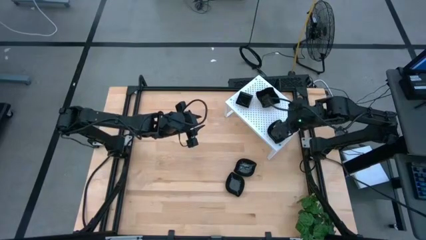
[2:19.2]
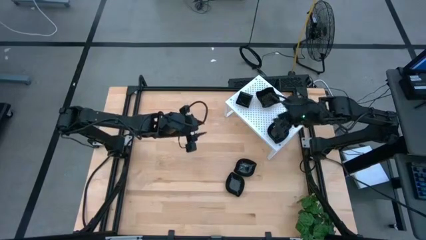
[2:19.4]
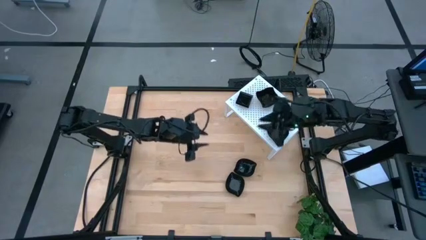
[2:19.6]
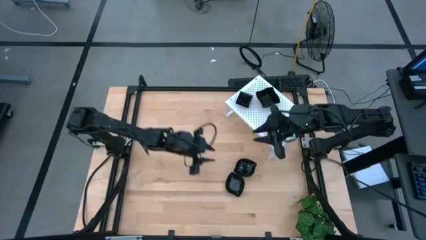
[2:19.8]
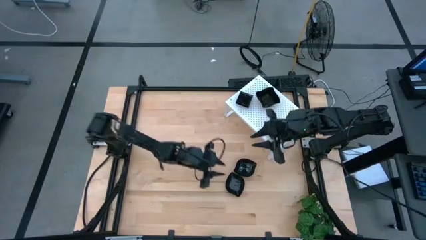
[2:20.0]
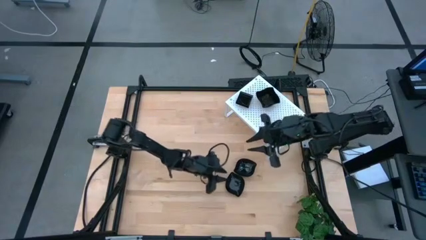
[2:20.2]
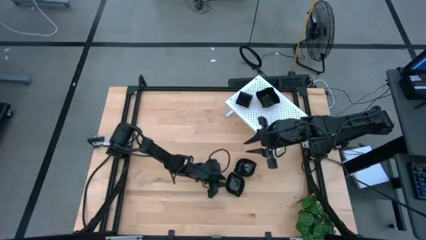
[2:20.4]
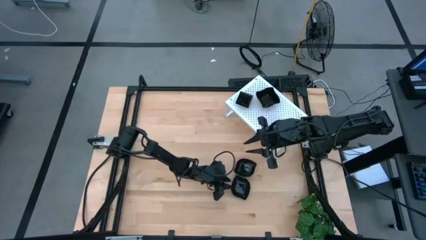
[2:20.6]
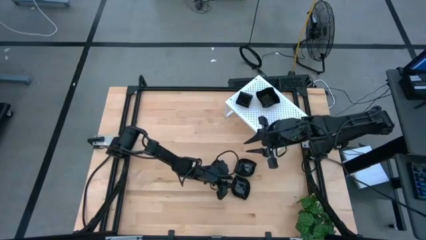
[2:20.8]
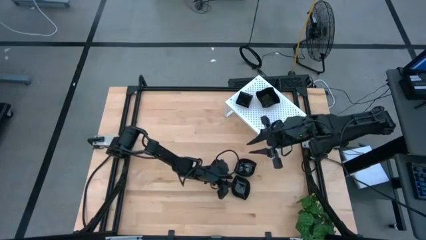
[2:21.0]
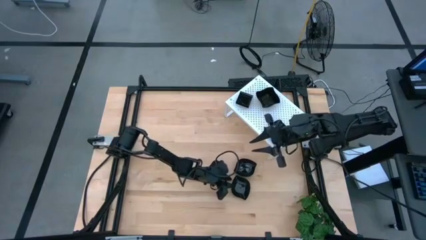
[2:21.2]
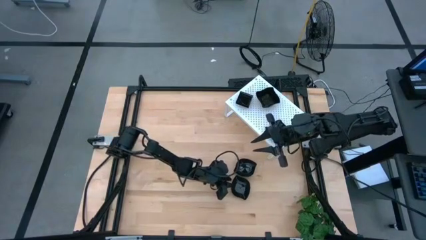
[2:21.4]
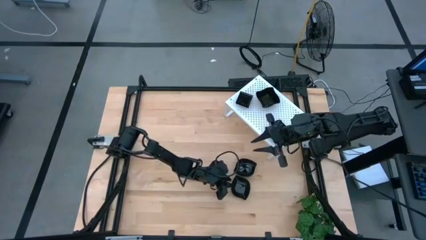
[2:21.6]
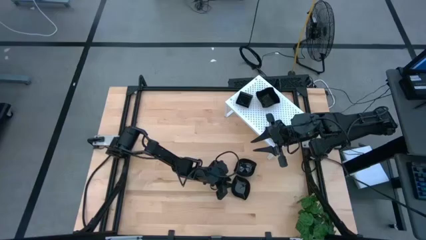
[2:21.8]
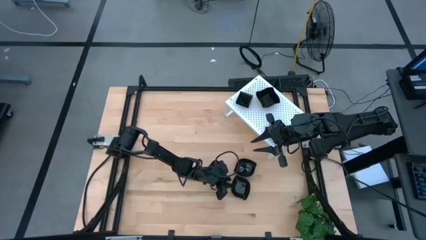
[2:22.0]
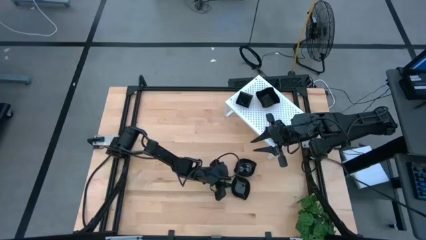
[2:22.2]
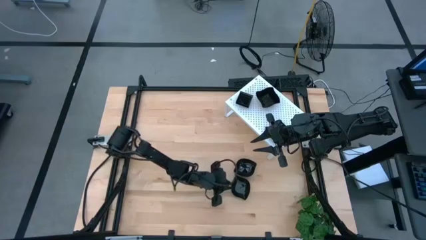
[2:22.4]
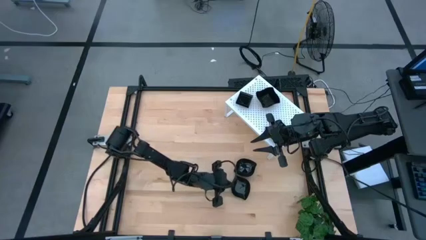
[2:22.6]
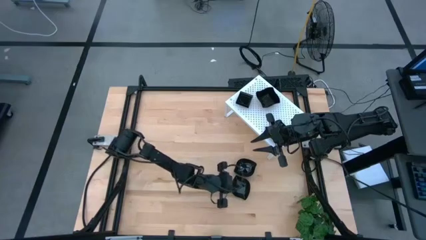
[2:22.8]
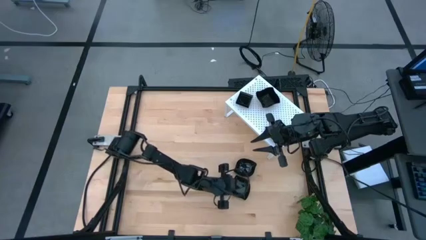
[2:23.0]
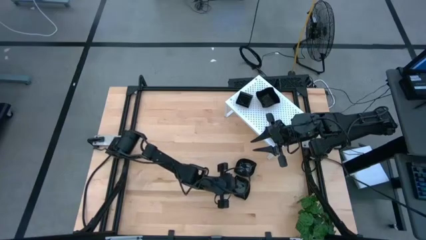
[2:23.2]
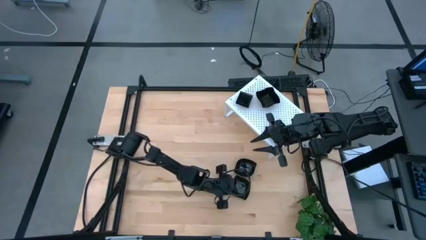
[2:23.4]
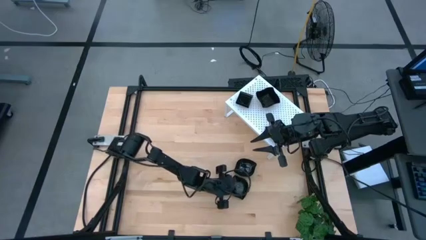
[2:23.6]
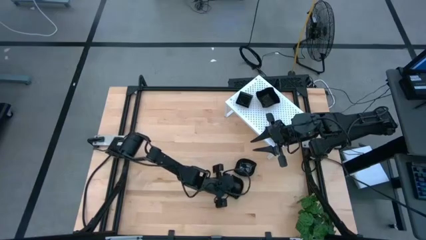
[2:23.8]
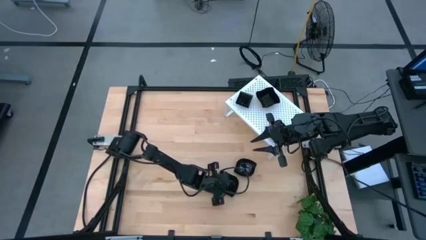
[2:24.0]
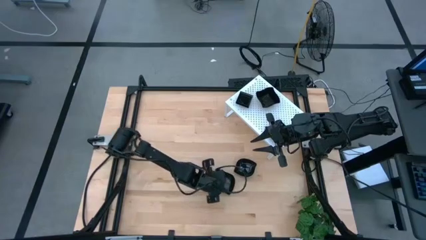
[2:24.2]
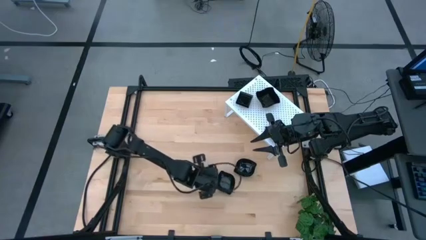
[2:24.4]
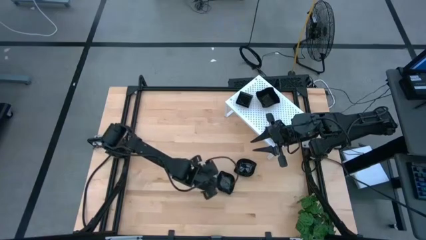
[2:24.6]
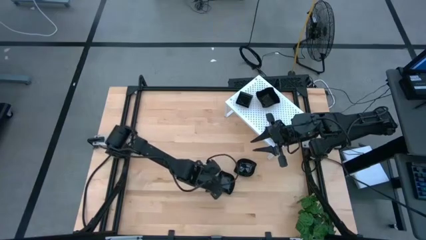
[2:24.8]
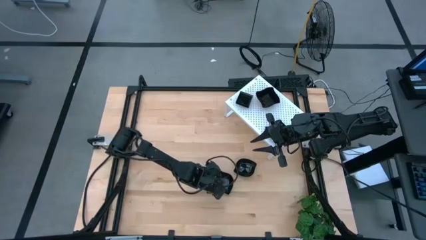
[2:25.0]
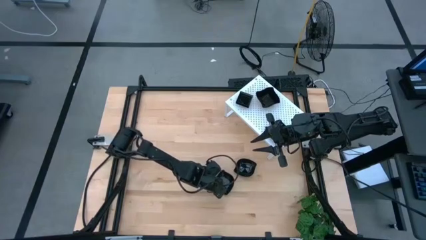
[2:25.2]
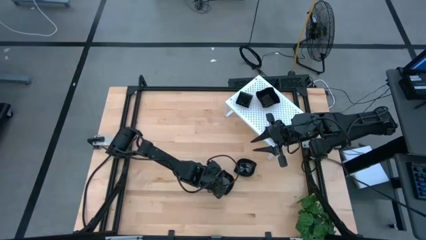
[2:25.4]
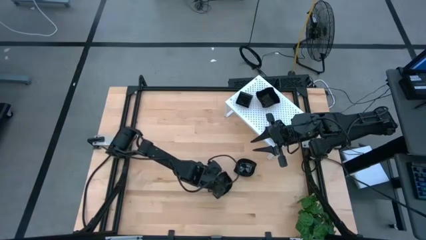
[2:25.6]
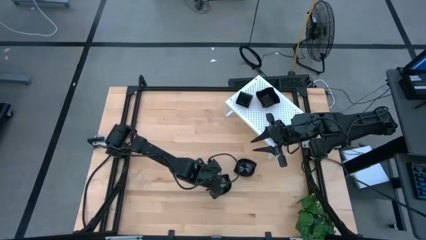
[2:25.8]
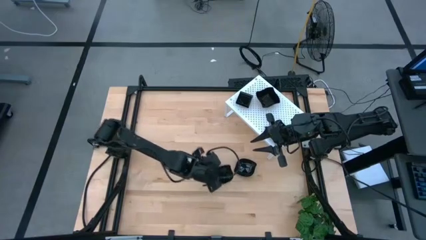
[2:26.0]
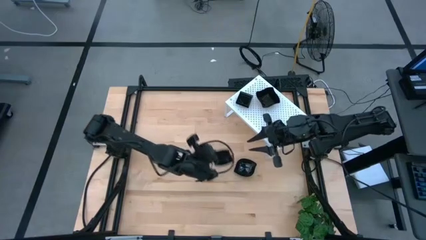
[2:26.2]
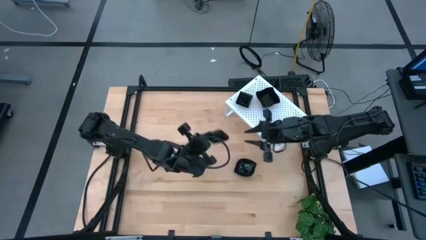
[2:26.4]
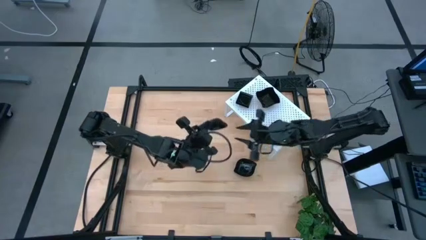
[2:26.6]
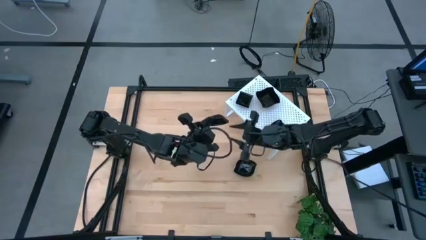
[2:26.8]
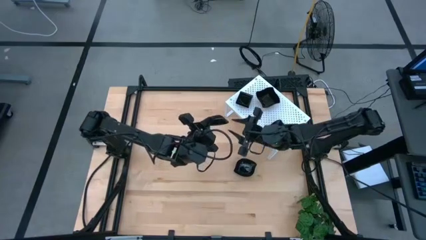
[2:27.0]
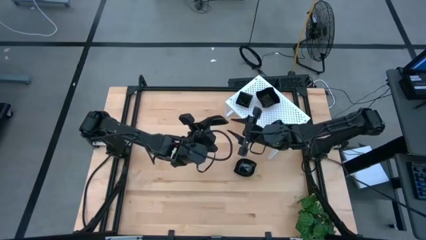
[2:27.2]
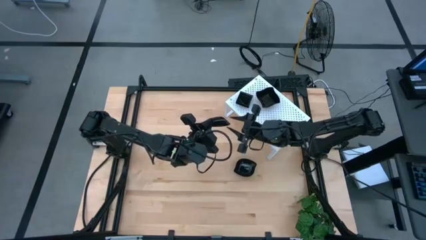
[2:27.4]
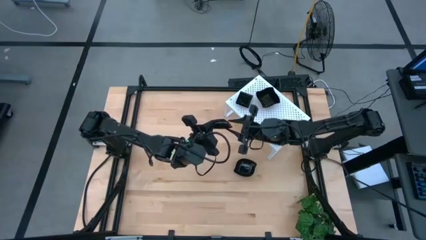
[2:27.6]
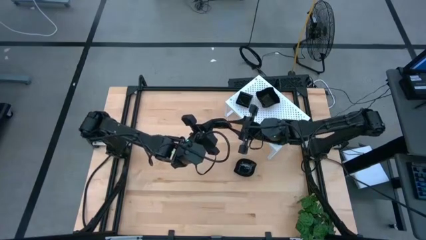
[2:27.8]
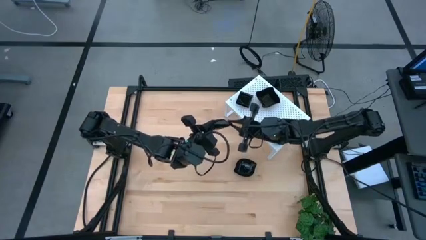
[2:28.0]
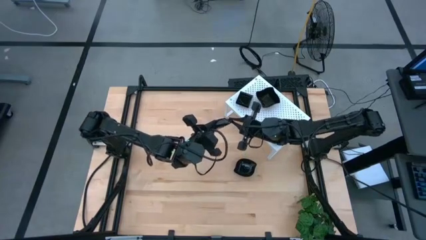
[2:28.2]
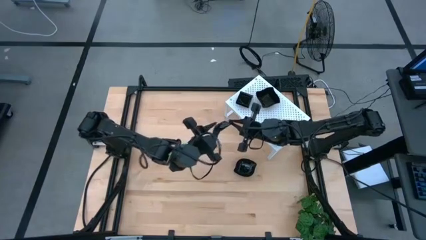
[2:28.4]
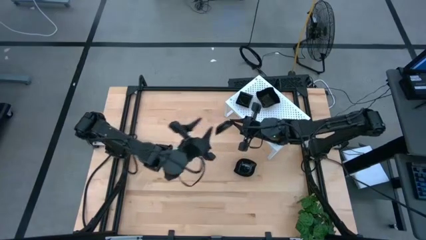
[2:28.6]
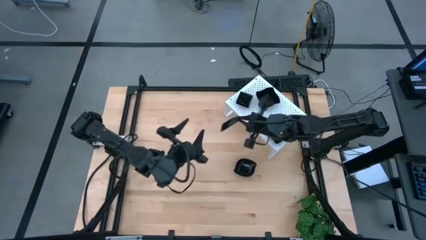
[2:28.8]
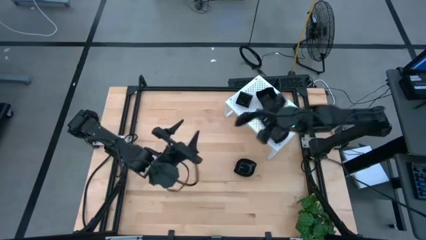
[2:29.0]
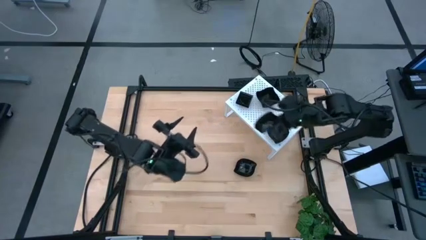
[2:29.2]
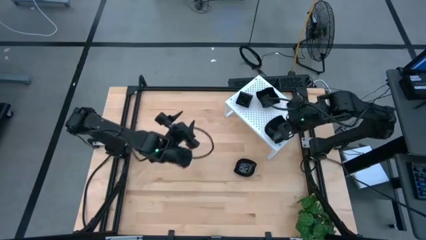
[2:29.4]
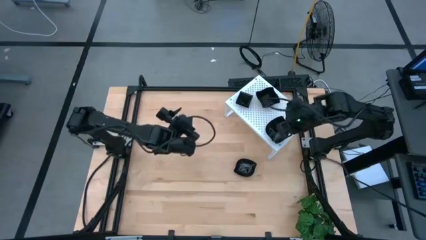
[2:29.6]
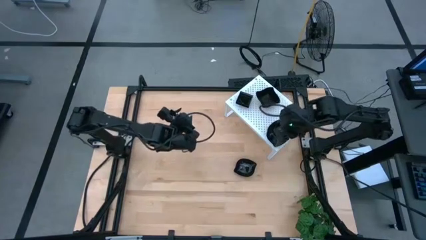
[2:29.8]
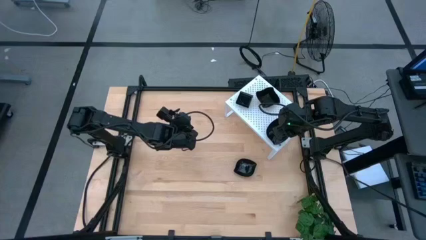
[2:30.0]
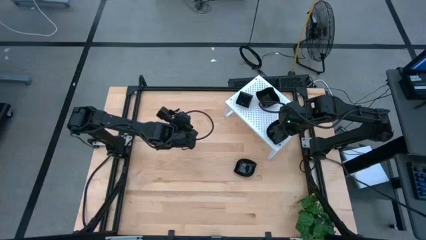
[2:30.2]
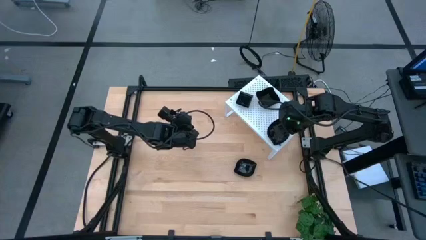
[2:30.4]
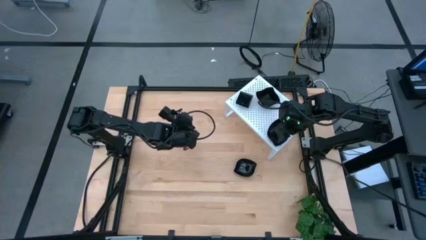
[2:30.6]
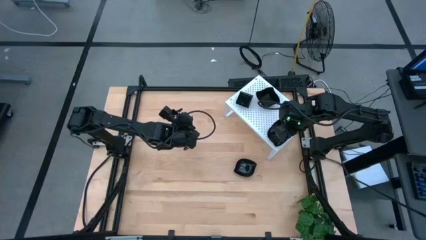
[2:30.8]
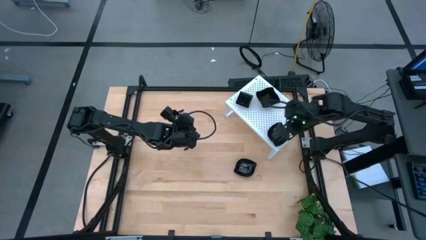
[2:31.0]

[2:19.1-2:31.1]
Task: Pick & Place Mini shaped plates
Stack the black leaf shaped plate on top of the other black leaf shaped plates on the shelf

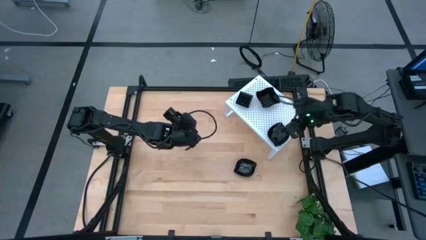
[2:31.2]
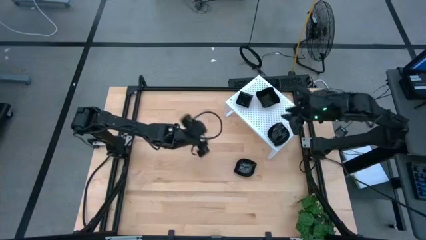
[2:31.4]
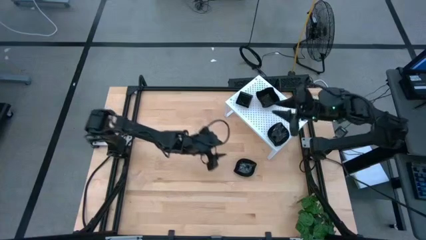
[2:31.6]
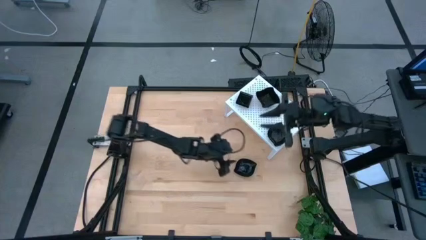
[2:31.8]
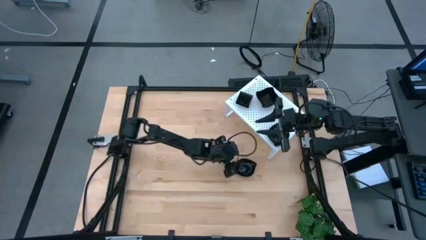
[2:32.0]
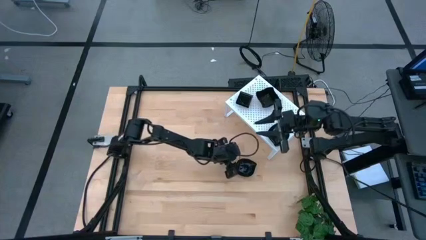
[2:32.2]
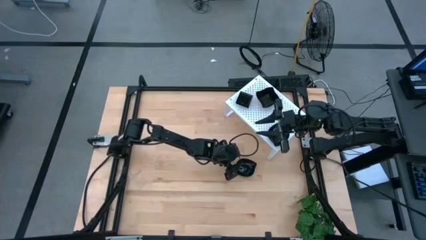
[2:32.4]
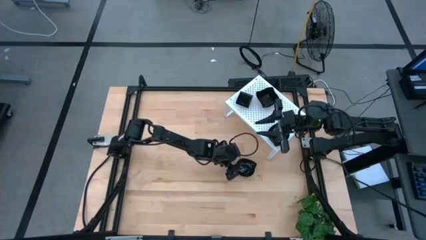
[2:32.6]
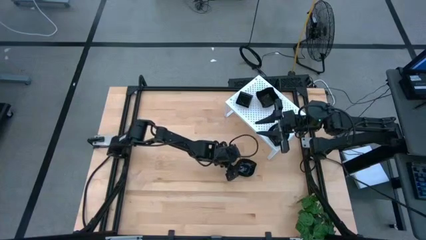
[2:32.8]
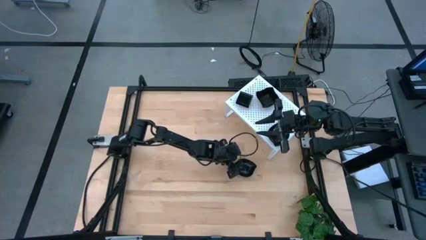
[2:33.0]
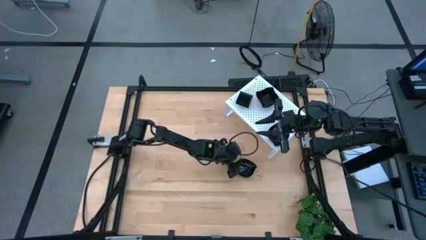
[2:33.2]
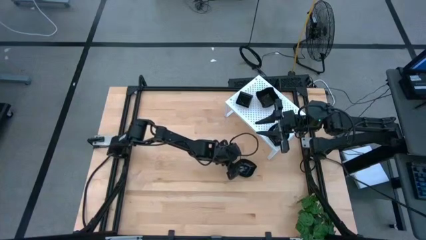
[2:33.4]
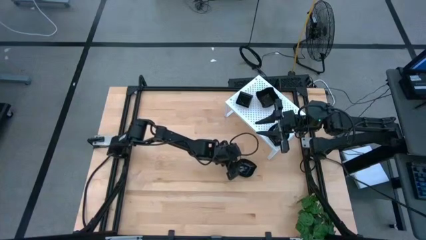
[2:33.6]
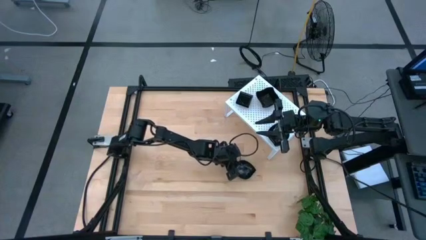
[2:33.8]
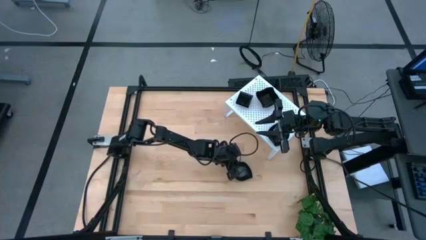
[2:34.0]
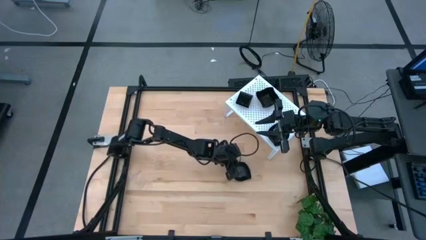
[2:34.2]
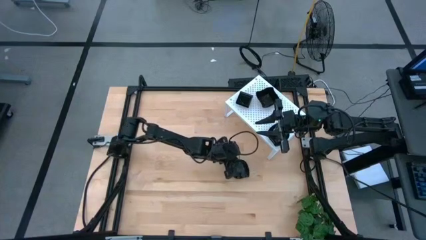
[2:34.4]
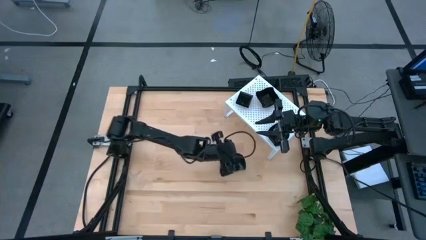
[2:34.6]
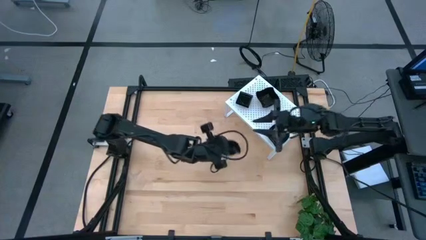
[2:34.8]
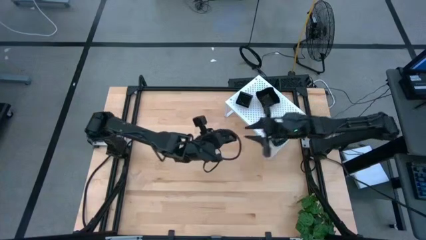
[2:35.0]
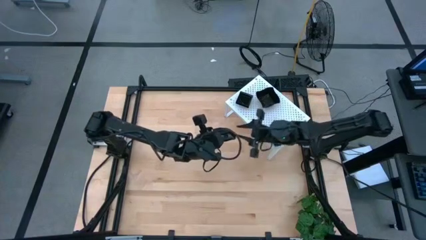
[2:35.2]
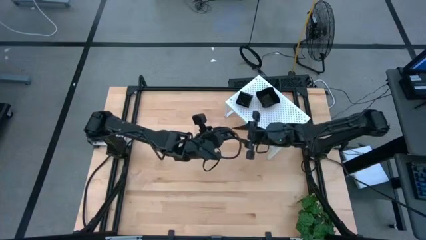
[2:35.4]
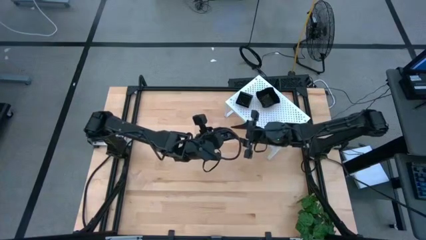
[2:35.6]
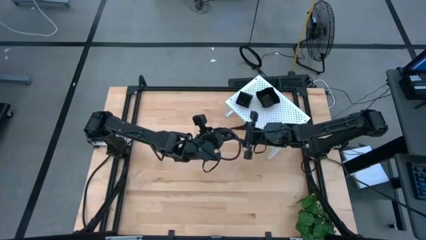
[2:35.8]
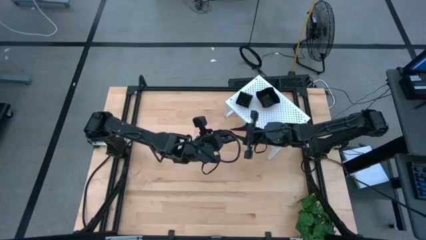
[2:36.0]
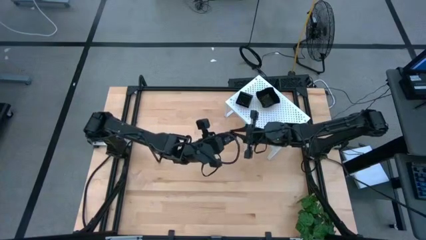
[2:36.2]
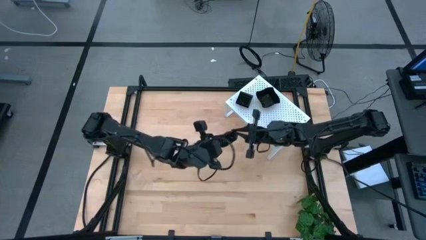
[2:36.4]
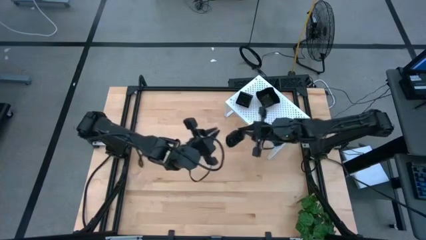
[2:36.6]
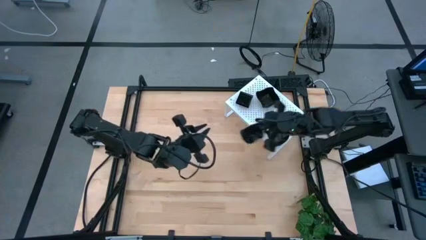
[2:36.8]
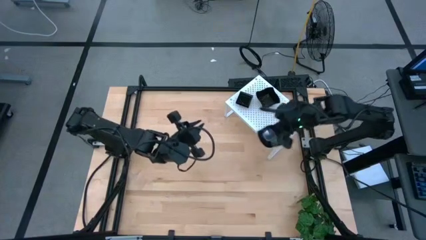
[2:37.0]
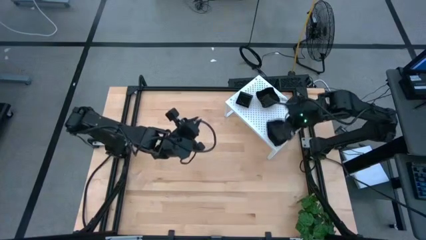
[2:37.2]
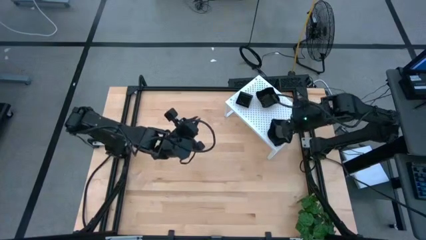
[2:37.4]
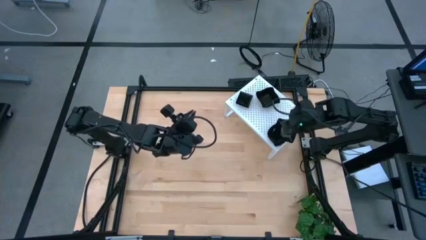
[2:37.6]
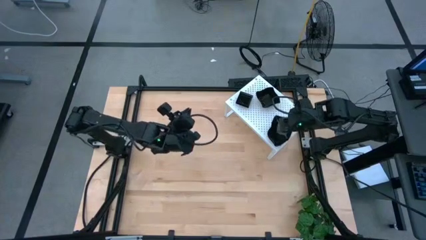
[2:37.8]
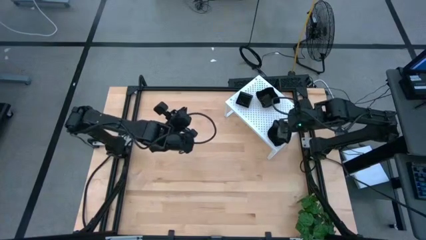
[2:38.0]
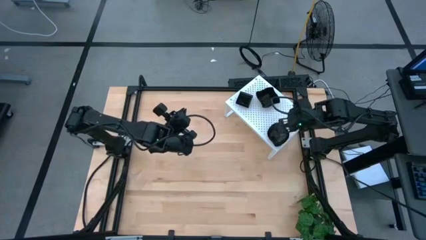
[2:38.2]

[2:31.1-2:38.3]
Stack the black leaf shaped plate on top of the other black leaf shaped plates on the shelf
